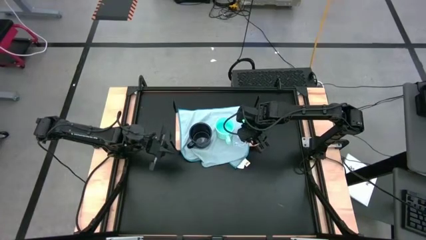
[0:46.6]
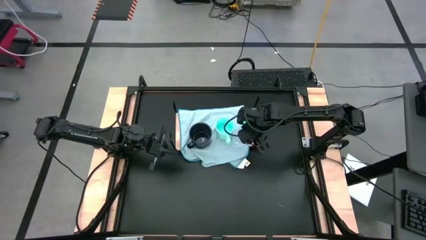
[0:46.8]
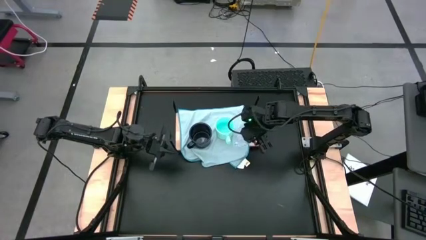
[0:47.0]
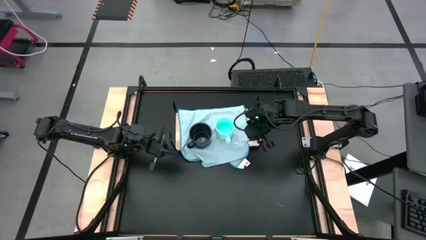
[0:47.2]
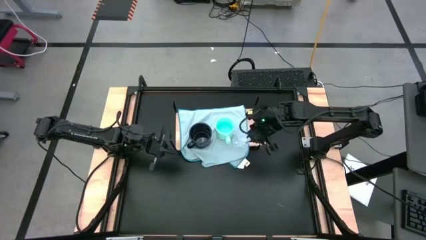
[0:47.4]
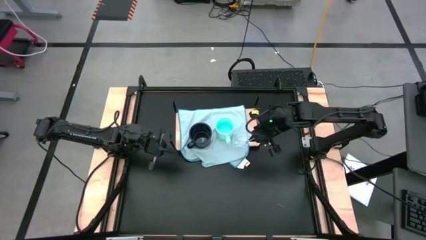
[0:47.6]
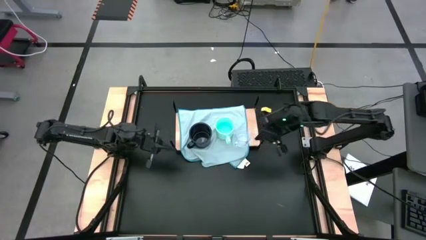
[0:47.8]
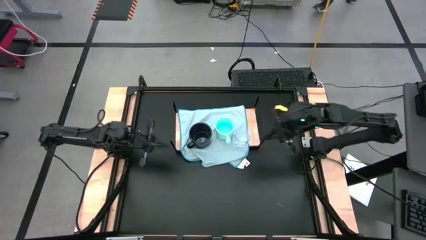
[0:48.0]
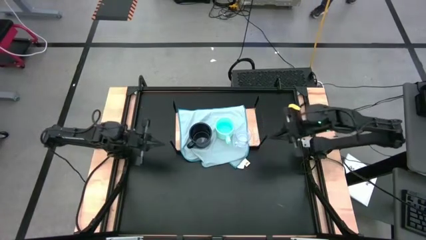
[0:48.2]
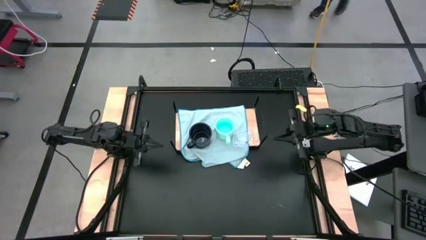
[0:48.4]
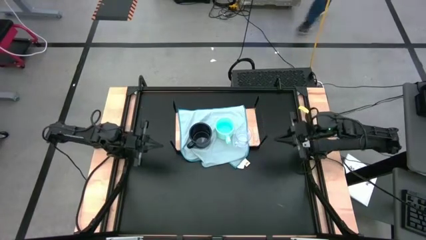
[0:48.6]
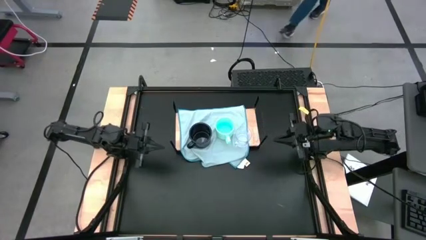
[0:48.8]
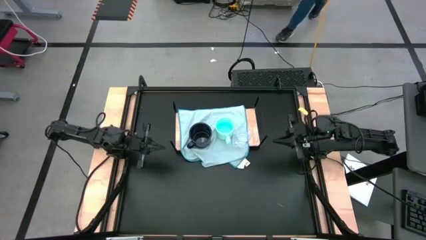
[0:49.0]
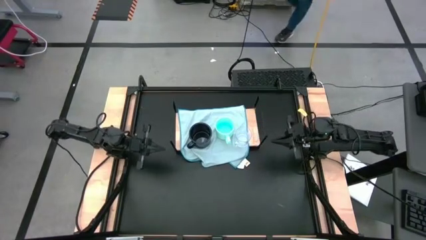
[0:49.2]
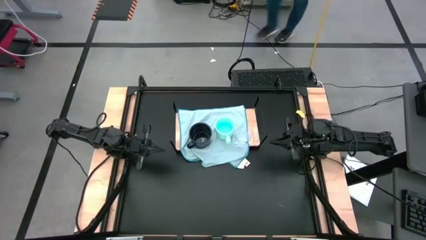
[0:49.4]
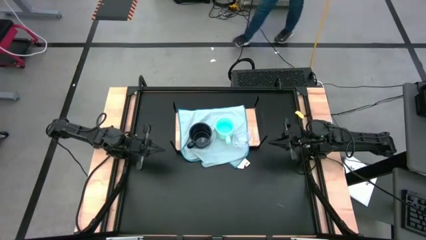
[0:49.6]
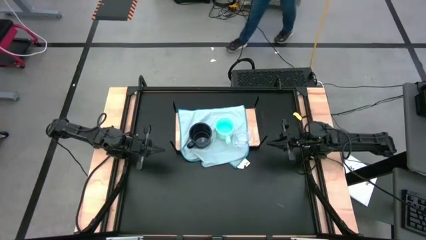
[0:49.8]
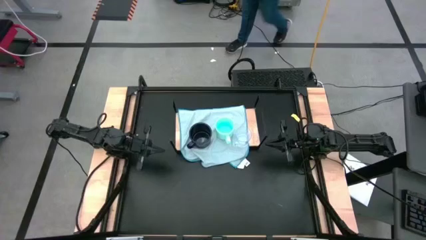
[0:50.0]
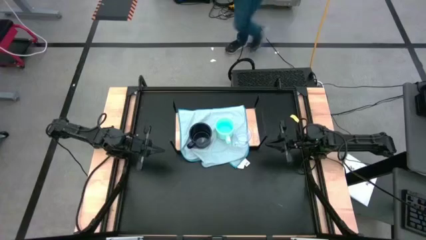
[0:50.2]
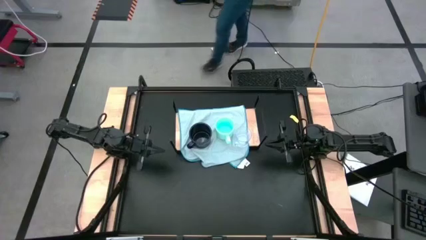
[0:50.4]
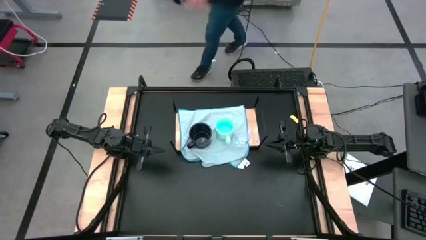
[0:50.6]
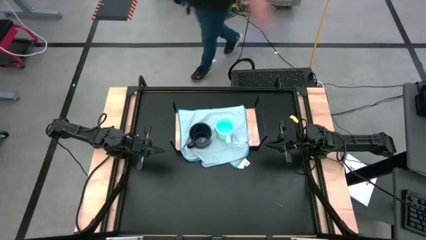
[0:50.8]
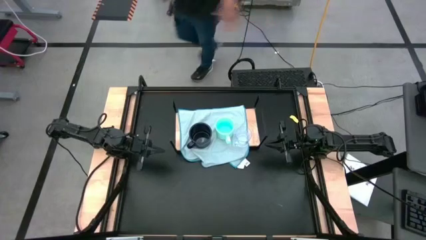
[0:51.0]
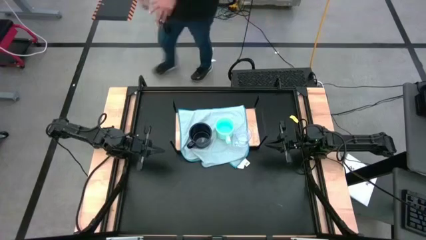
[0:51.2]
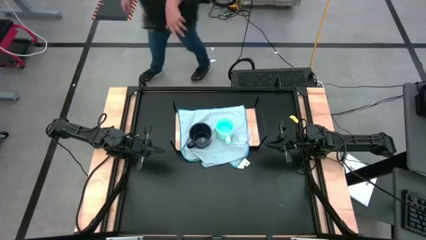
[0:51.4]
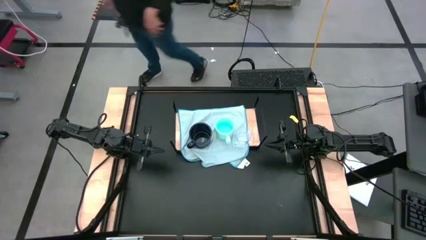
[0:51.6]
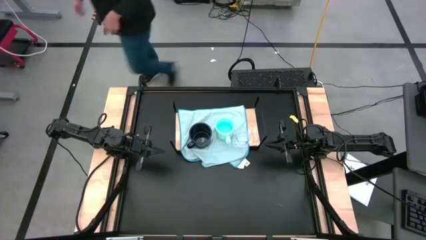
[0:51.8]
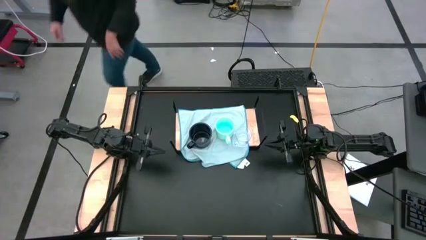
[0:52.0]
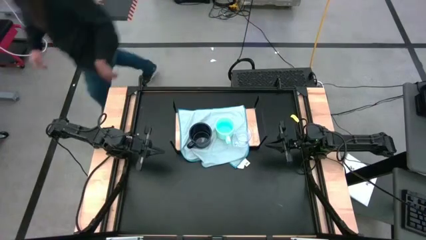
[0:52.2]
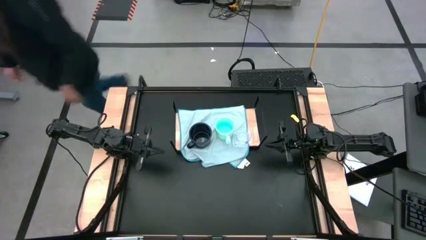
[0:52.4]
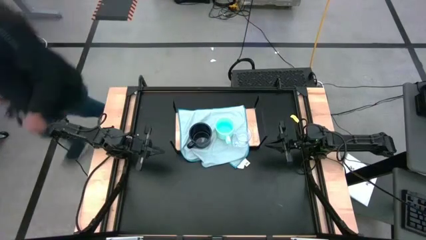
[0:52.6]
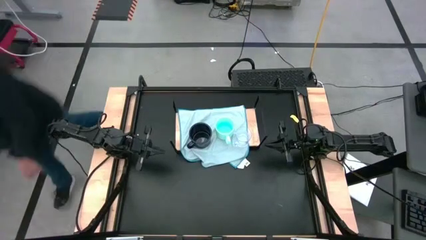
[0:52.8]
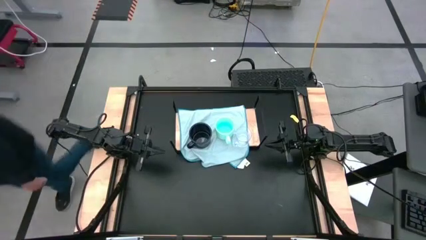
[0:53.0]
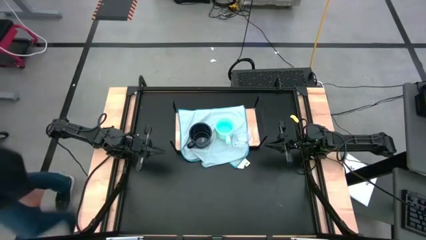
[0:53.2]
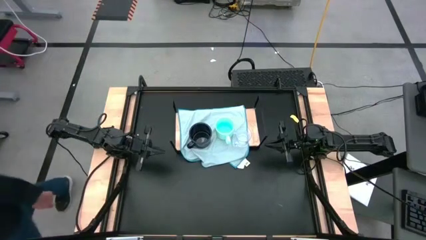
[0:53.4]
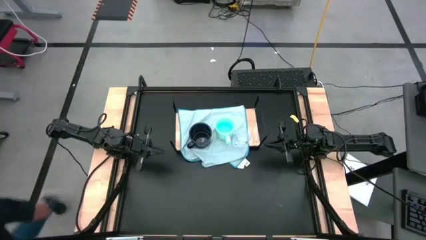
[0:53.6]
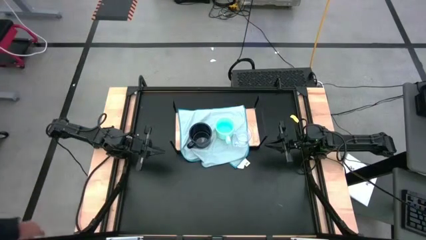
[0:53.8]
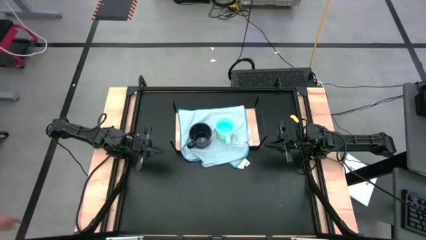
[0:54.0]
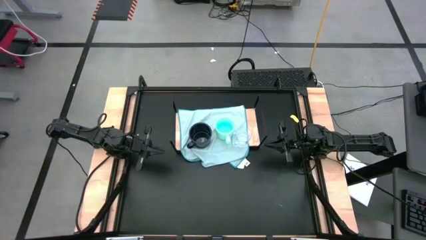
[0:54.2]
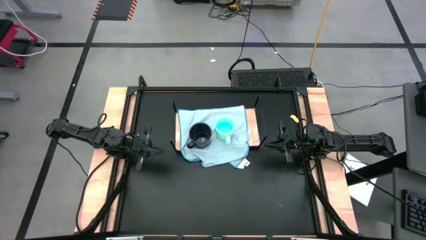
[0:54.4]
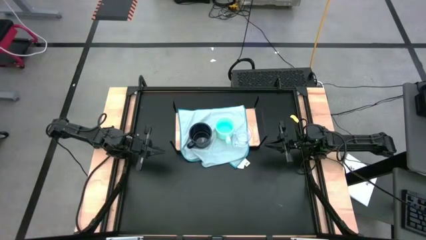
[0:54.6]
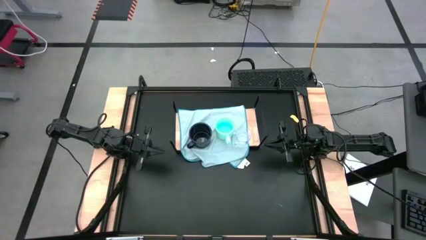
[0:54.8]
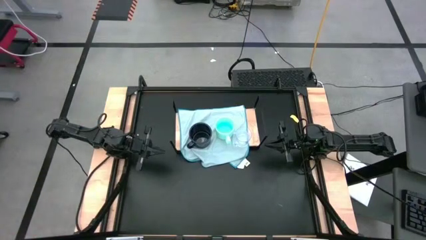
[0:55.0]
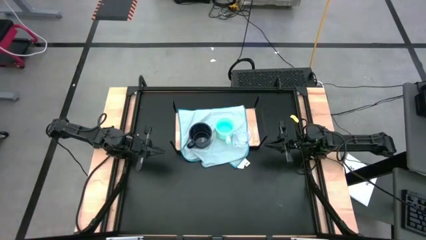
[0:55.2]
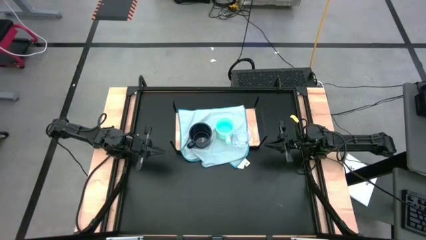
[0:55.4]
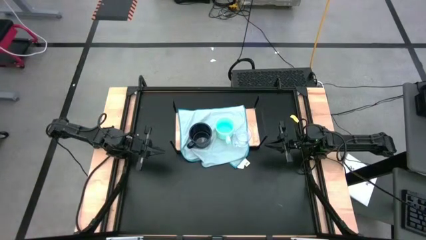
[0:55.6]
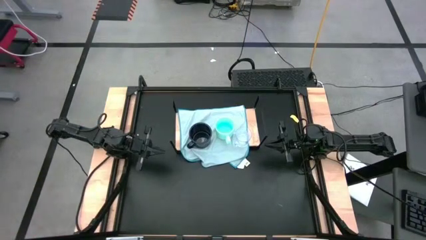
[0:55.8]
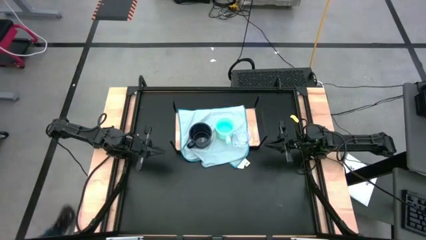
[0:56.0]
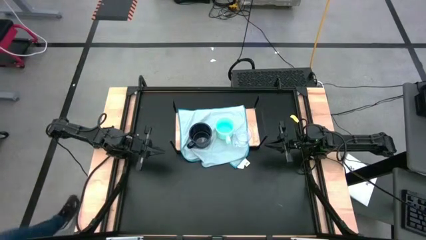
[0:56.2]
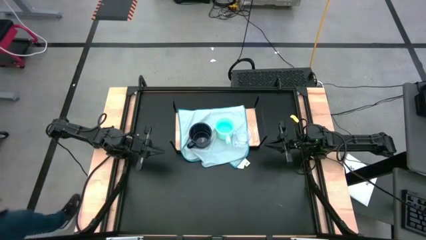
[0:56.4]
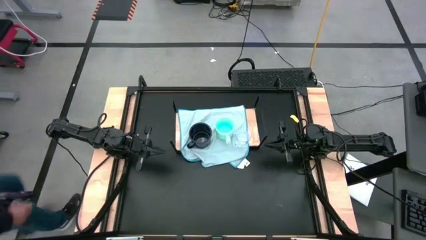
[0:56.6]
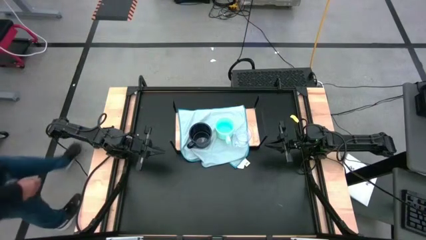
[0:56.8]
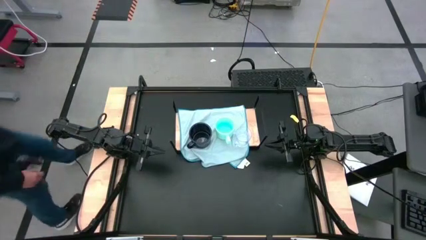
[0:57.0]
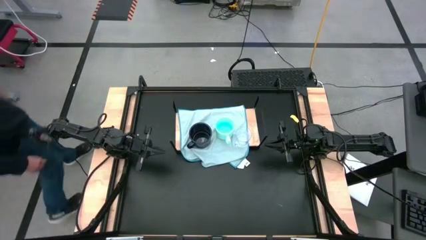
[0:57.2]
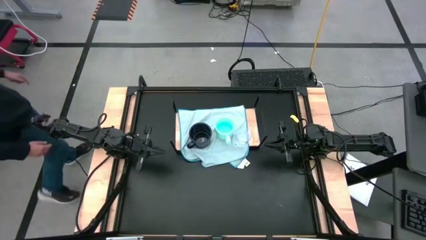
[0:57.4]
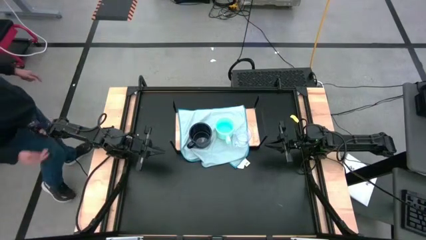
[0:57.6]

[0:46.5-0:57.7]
Task: Stack small to large cups/mugs on shelf
Return to home position
